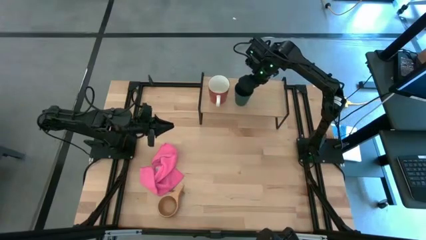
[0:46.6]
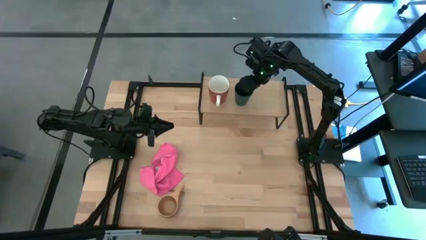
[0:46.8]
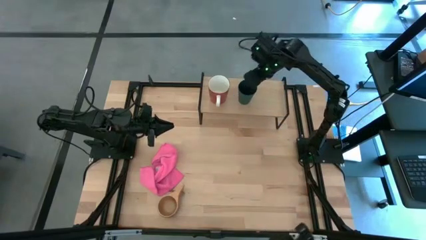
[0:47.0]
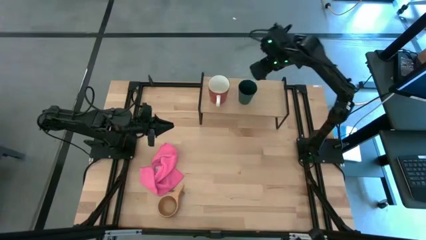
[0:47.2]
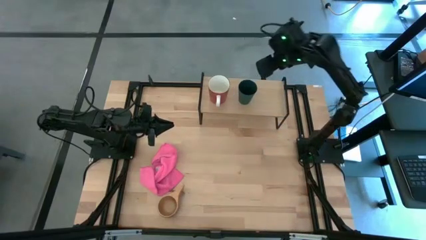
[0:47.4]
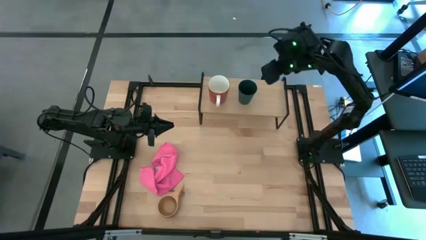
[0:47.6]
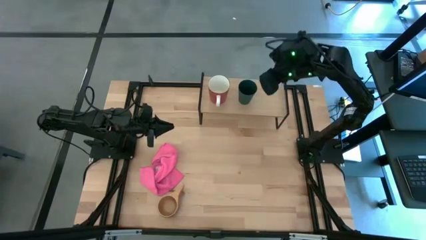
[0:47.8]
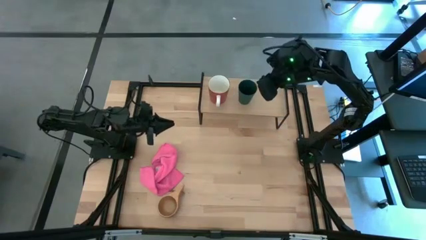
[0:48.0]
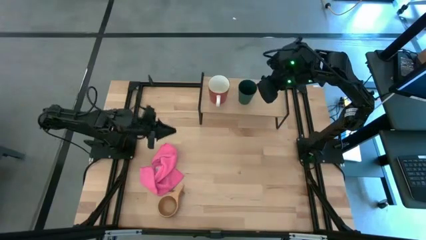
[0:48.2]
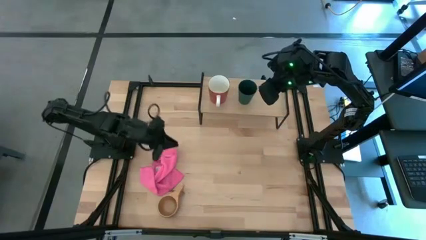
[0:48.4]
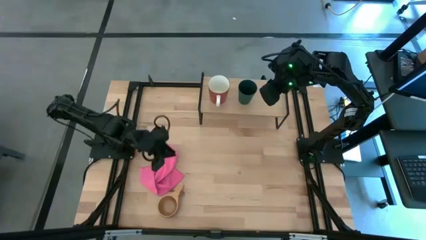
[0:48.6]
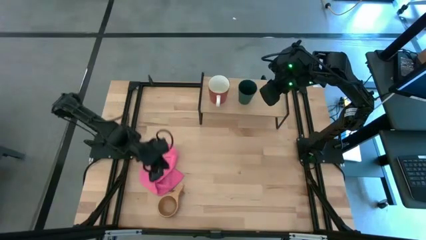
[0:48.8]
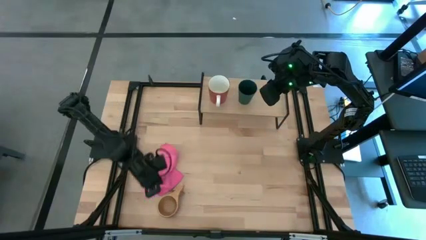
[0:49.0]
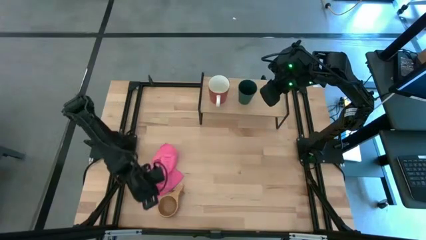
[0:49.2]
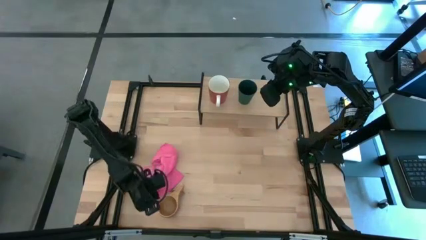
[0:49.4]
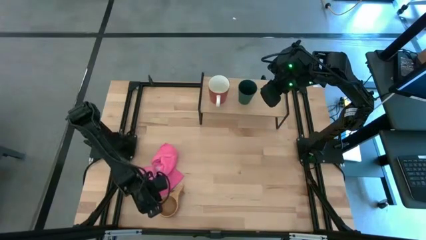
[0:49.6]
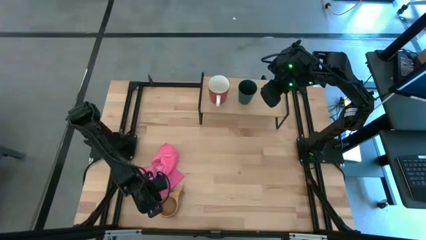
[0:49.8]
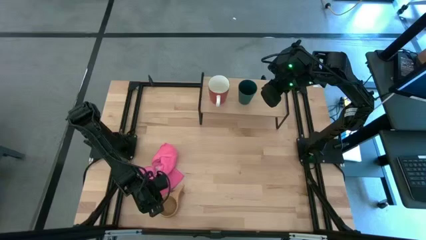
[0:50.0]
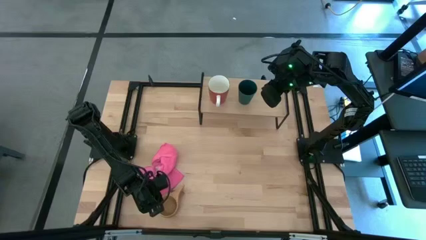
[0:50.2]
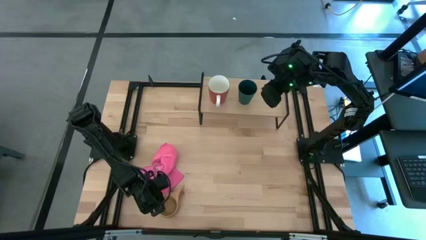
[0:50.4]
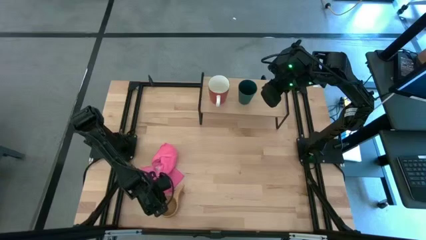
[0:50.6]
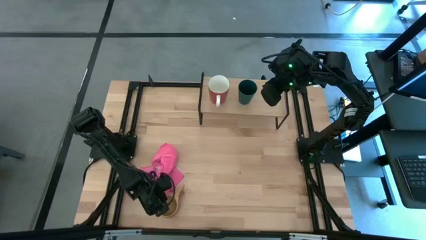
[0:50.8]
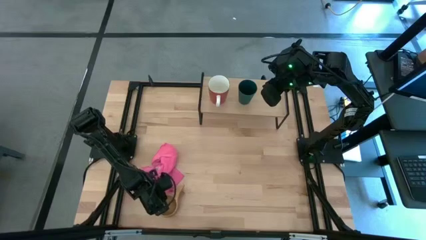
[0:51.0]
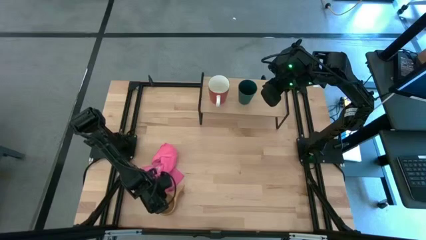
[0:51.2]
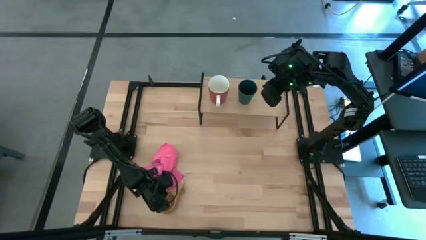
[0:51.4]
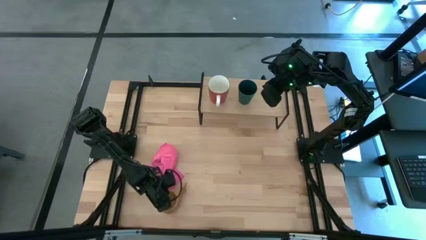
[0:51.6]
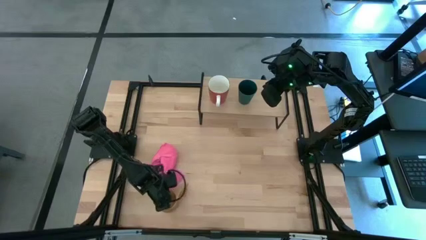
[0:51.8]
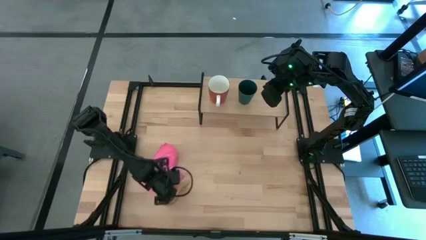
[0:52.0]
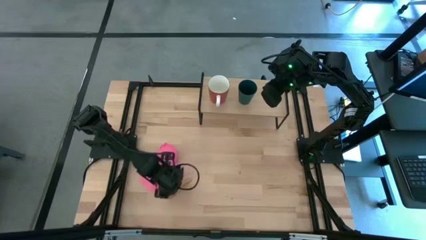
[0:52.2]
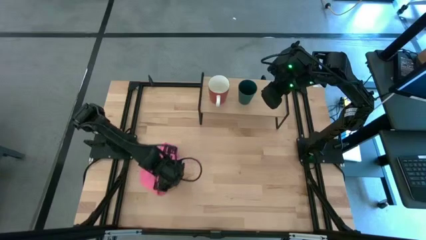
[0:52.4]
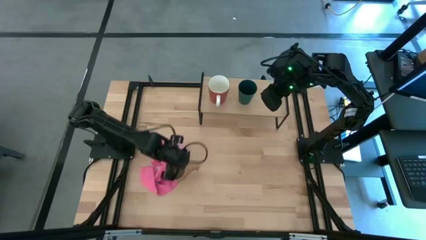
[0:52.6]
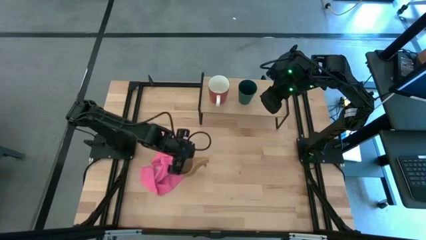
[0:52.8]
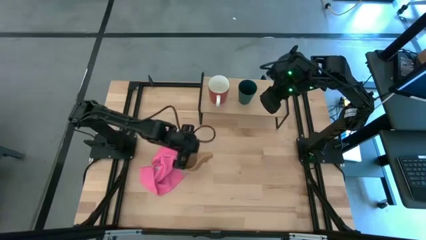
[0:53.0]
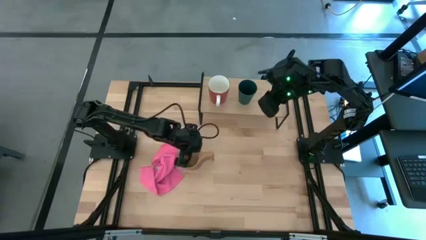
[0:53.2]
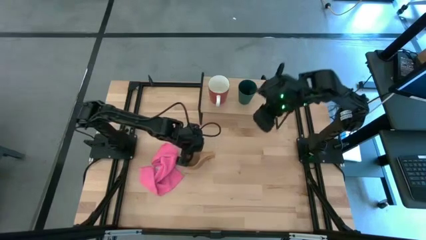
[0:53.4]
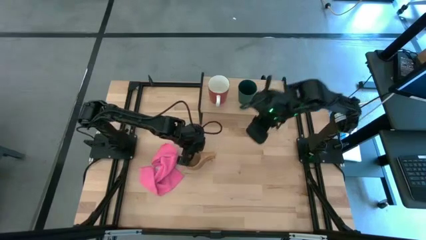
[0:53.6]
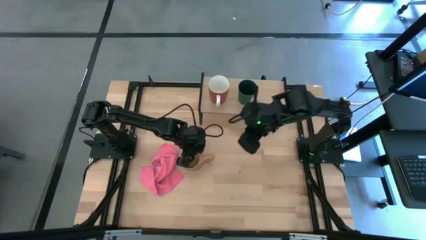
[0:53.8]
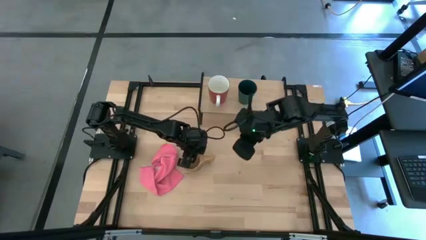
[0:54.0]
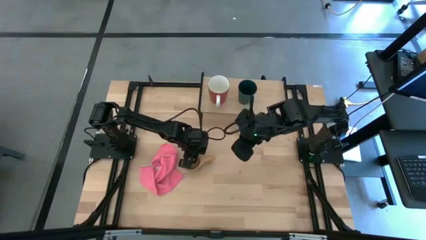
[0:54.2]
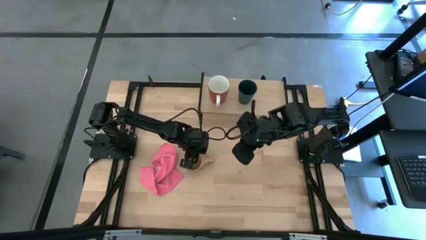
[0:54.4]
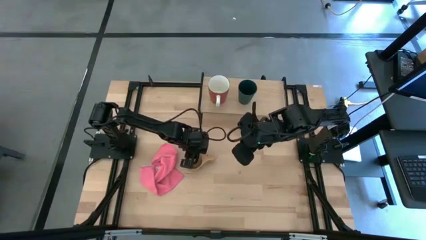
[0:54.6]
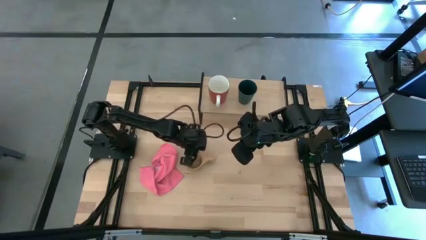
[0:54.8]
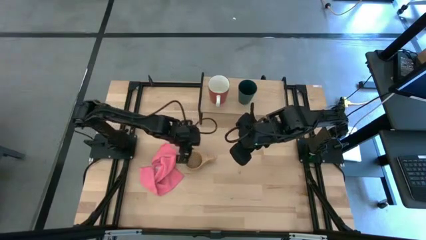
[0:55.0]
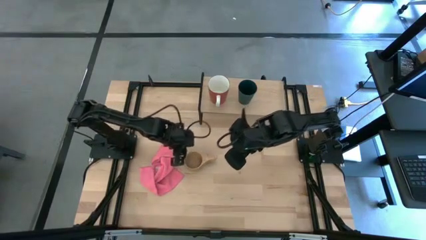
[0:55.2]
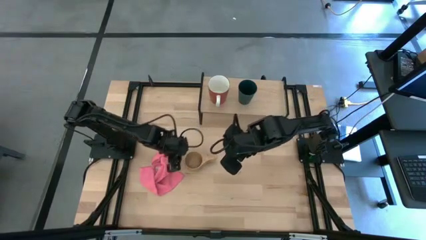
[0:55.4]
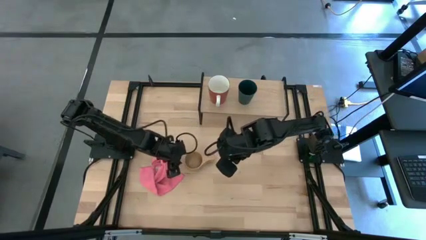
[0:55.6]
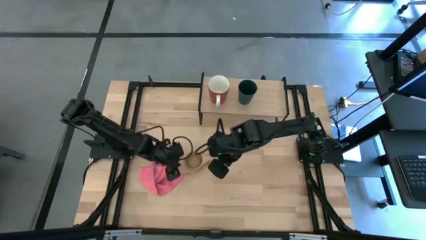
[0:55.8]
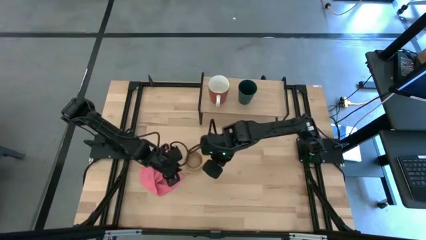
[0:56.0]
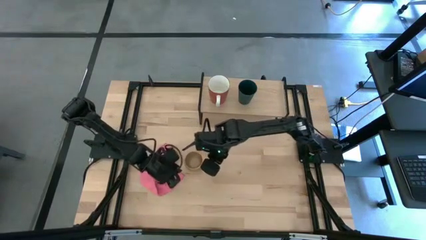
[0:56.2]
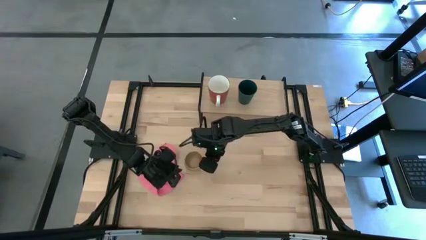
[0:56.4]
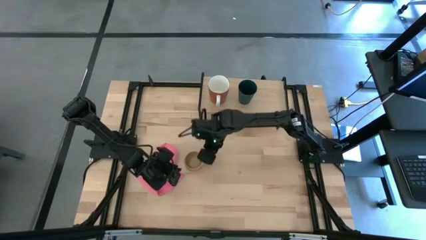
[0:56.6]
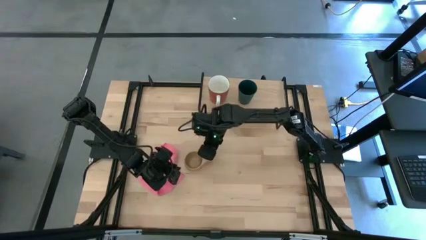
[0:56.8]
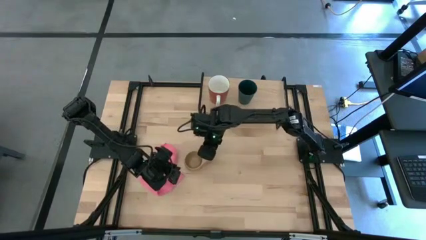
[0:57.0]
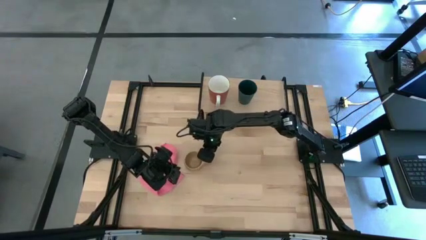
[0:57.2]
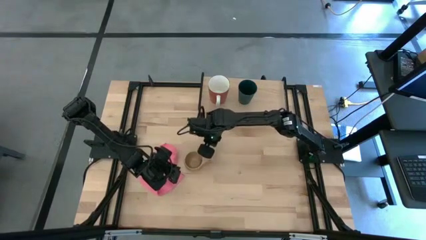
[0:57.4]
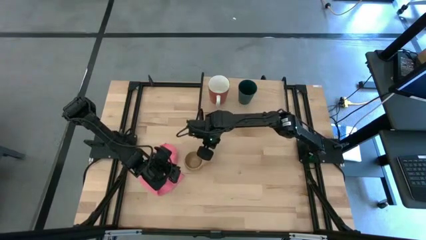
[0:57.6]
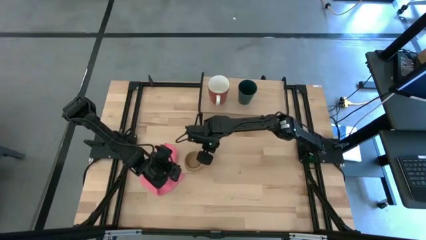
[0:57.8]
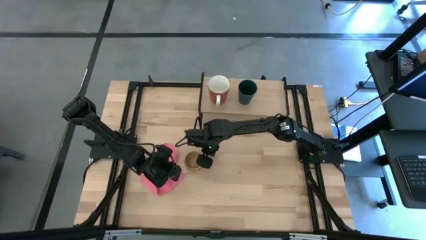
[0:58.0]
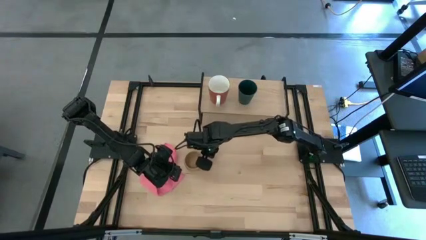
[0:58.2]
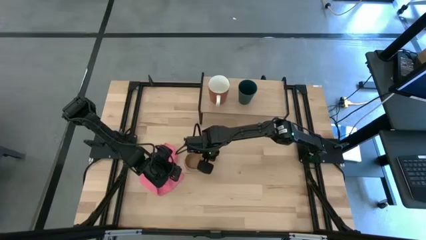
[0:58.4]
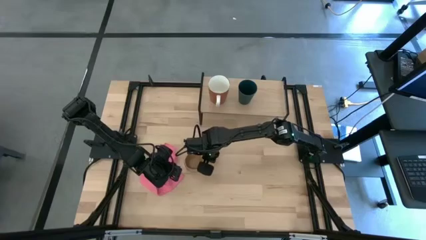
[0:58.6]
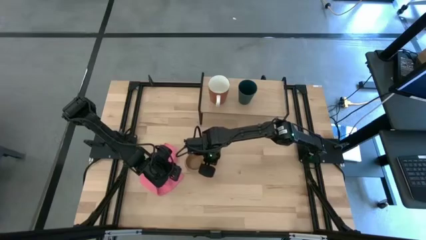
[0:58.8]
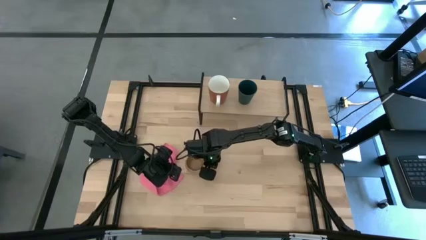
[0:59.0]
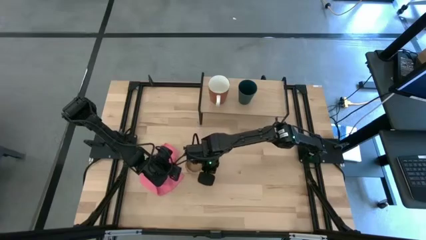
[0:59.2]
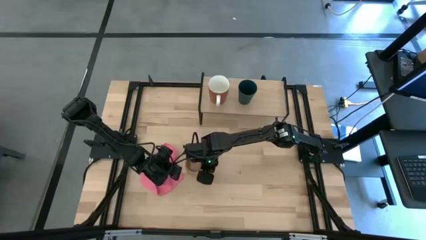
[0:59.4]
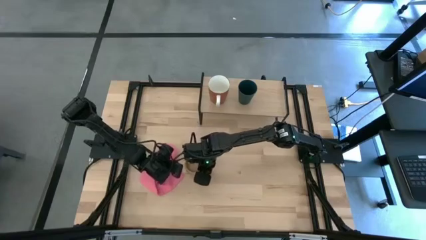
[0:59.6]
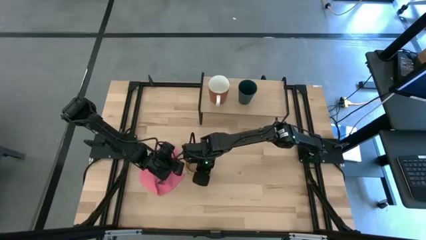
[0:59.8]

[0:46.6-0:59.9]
Task: Stack small to large cups/mugs on shelf
Put the brown wooden mug on the shelf
